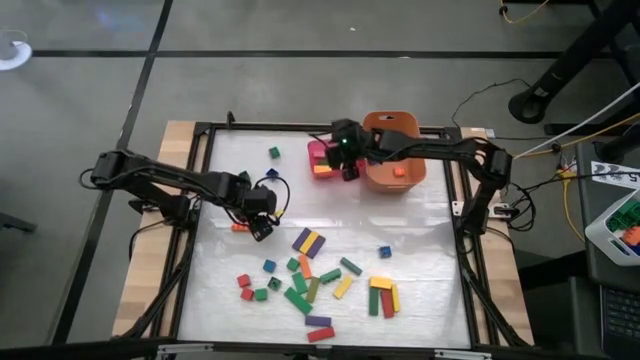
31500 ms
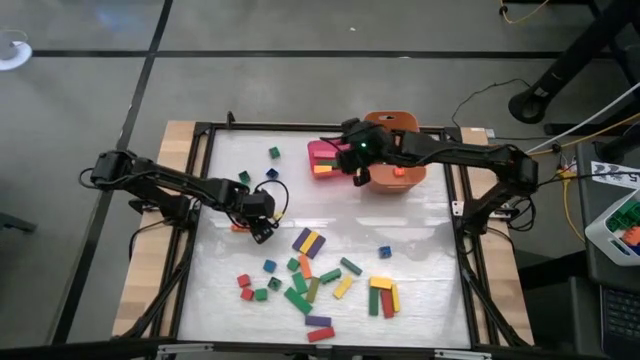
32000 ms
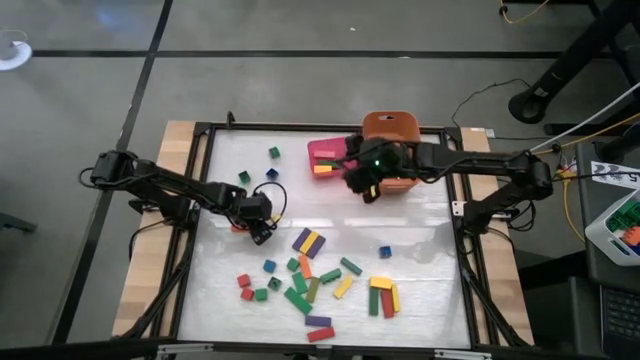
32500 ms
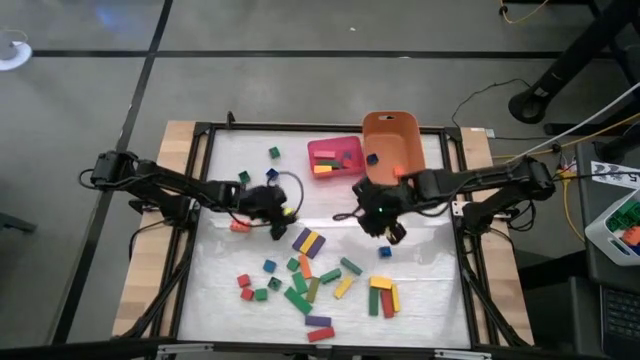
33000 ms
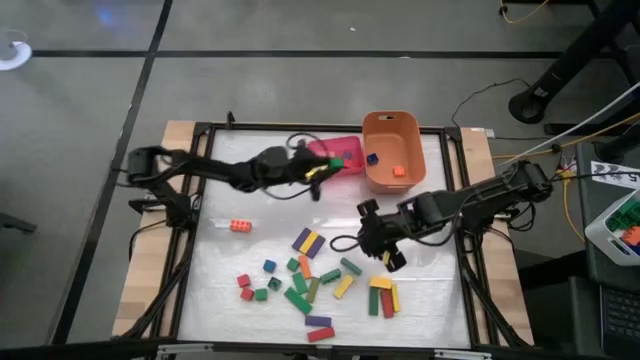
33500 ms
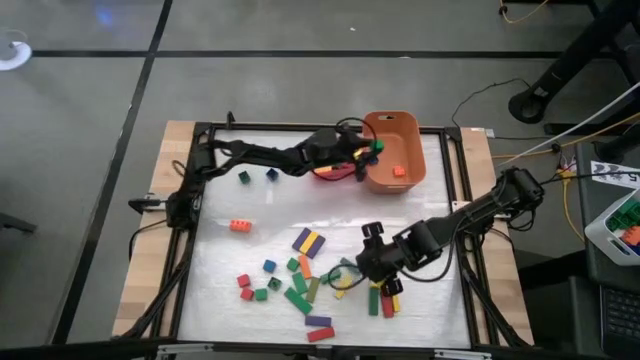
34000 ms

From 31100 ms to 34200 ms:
Task: Sort blocks by size
Put the small green block into the orange bin

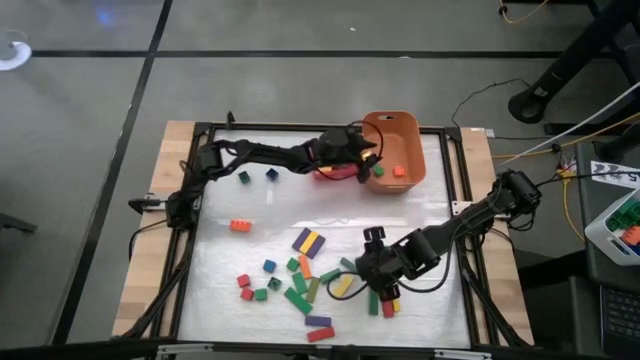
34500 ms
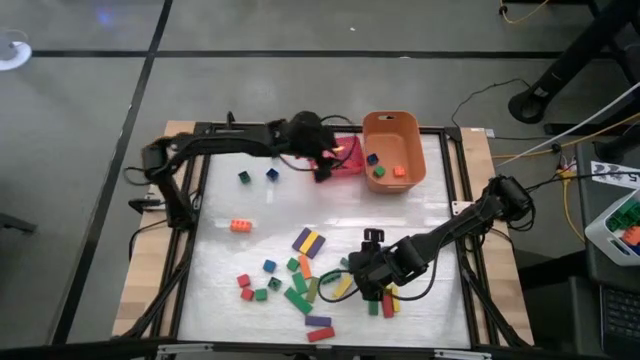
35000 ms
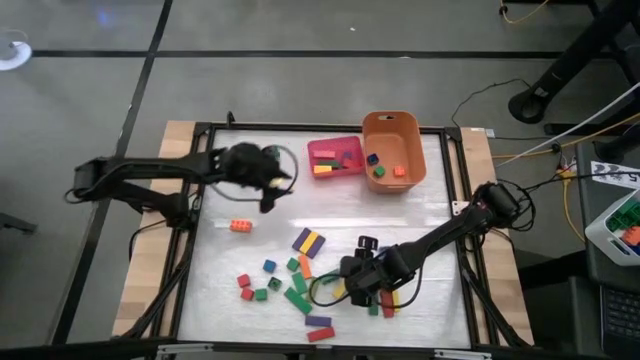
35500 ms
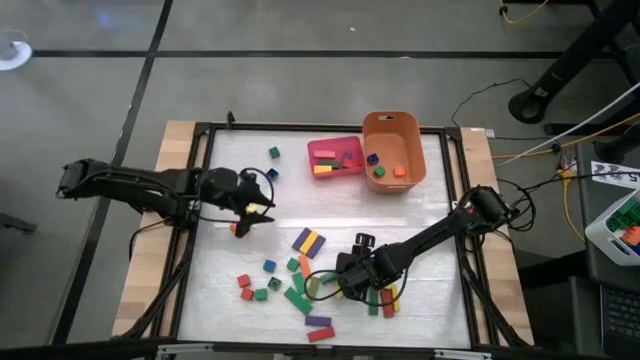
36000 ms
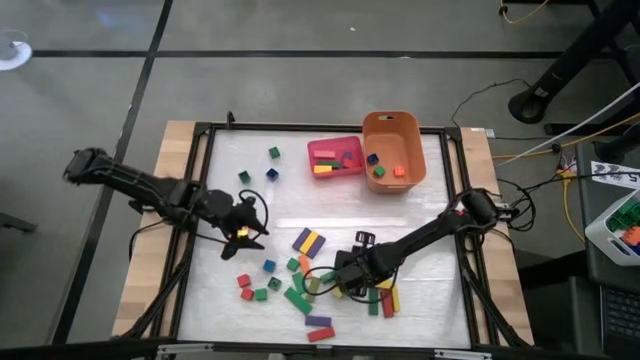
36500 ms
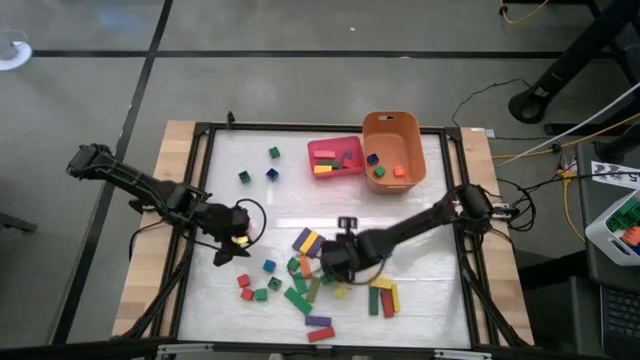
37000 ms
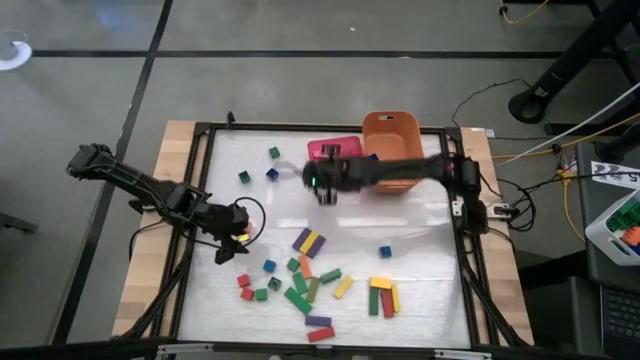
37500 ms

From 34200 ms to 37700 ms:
Put the large green block into the pink bin

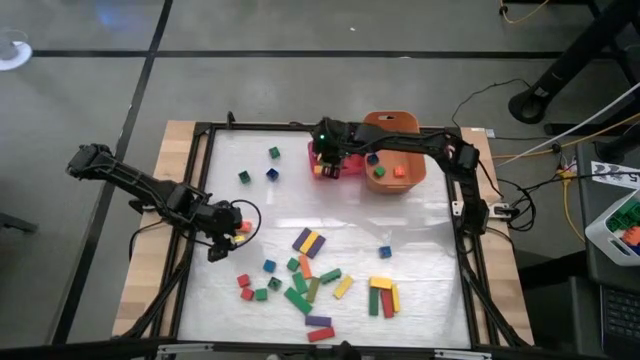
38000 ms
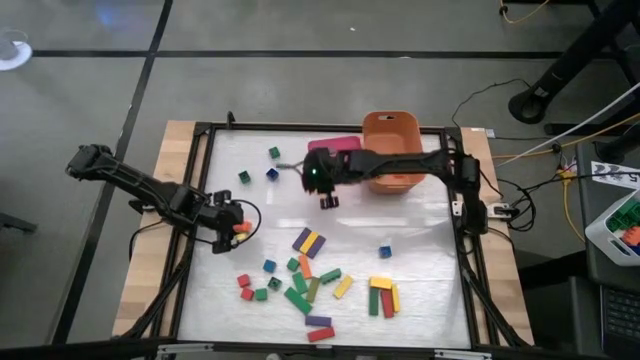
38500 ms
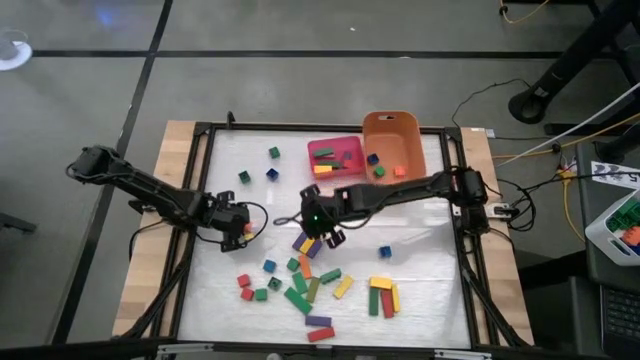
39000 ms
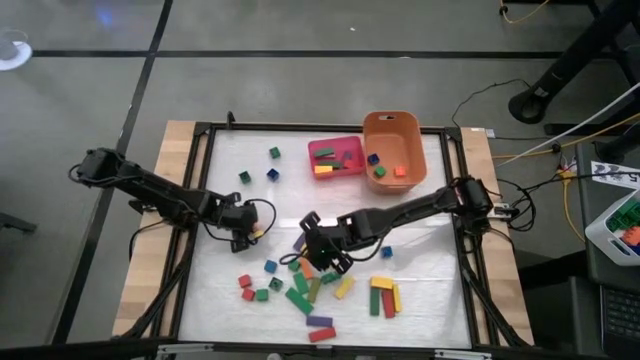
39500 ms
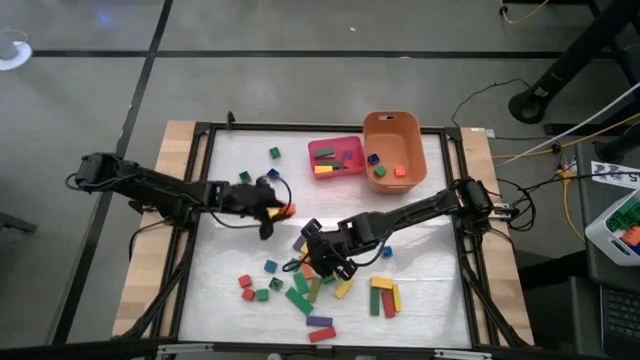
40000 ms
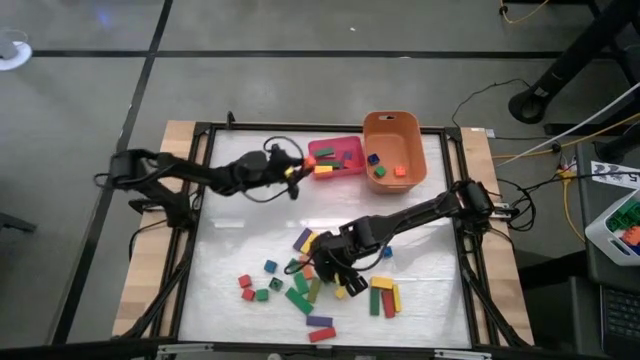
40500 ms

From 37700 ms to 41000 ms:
Put the large orange game piece into the pink bin

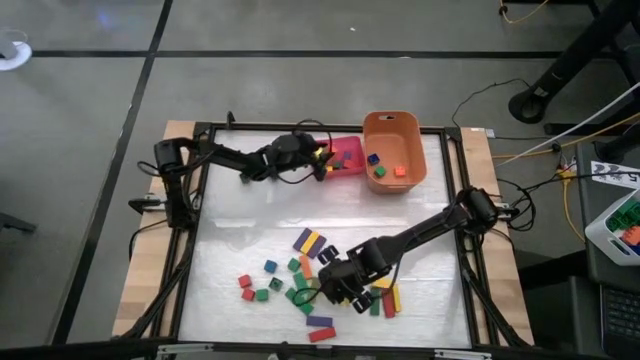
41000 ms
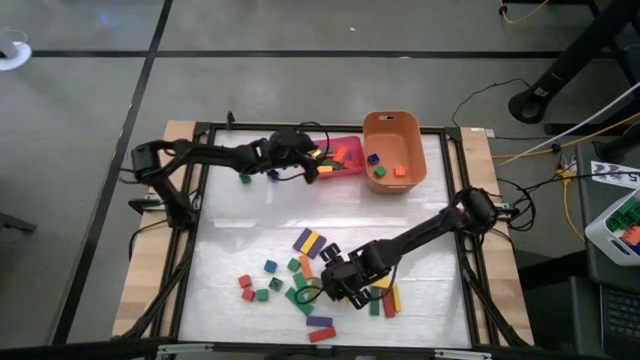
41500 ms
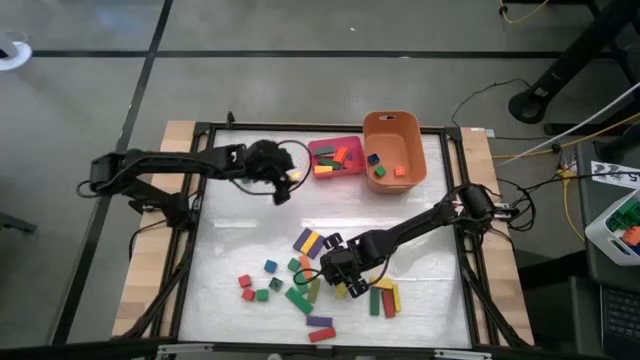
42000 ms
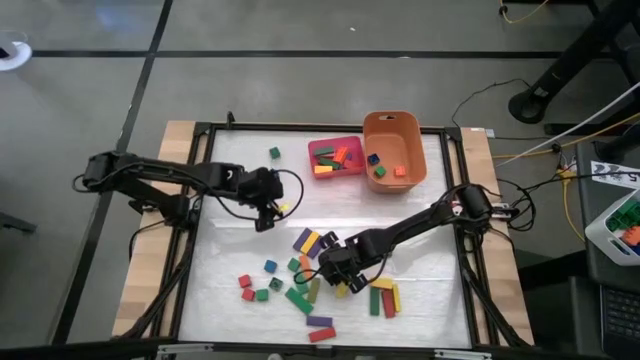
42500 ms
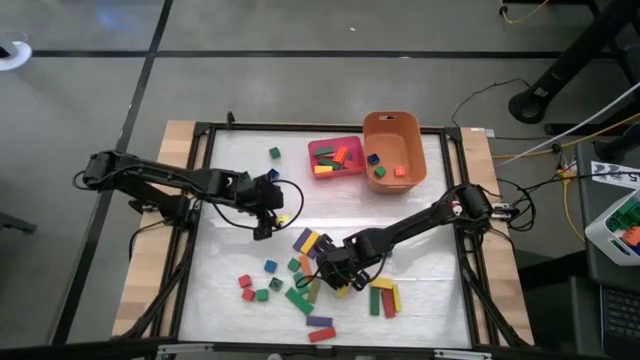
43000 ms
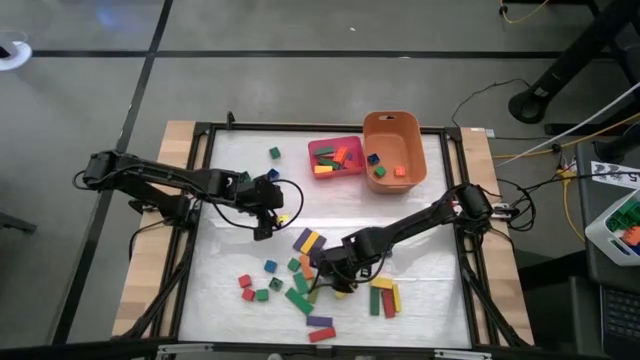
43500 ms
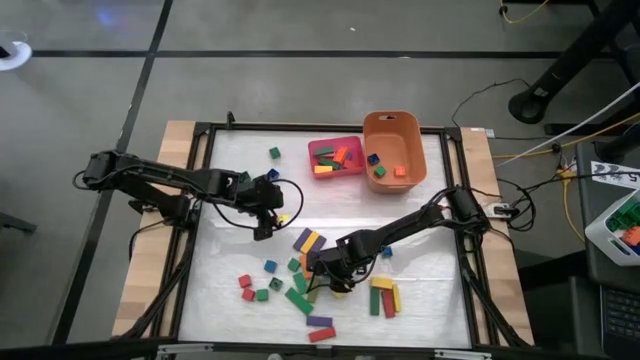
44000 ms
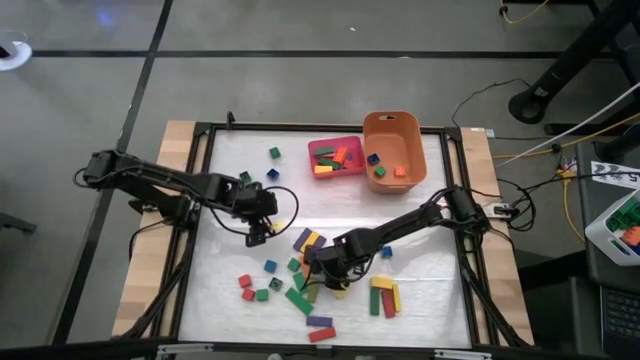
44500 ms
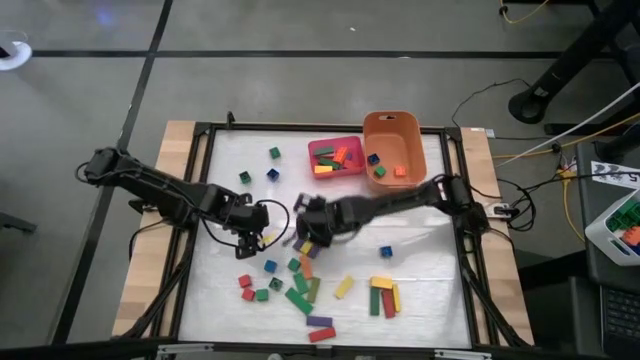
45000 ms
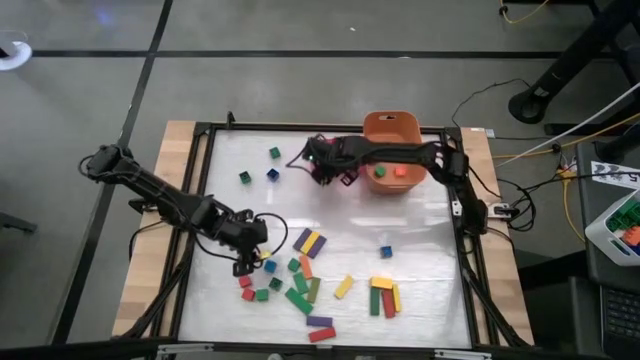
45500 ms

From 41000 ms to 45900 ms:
Put the large green game piece into the pink bin

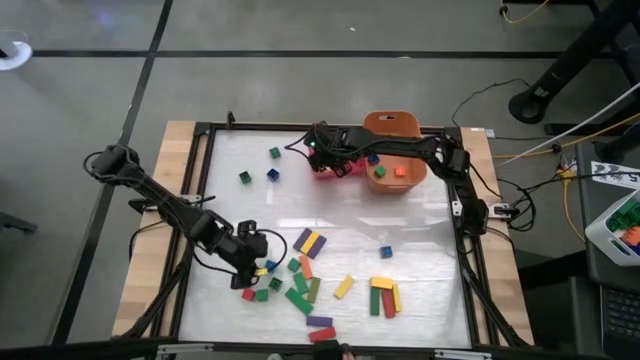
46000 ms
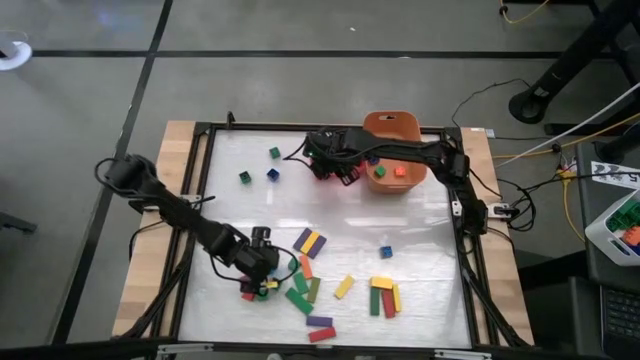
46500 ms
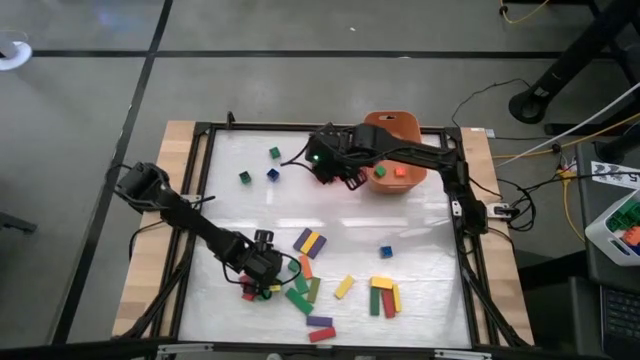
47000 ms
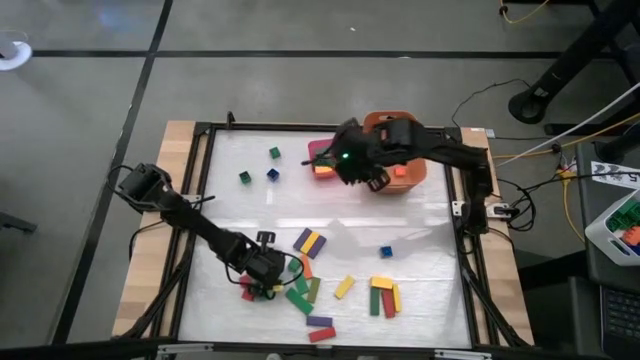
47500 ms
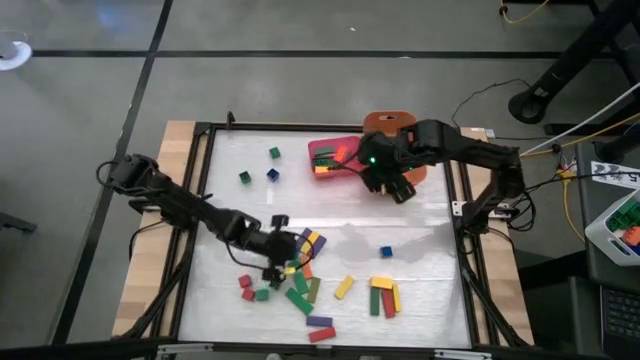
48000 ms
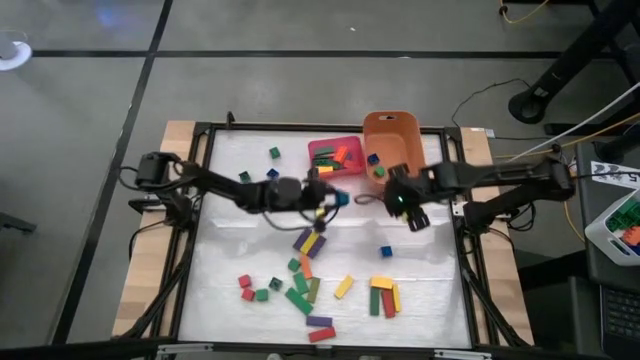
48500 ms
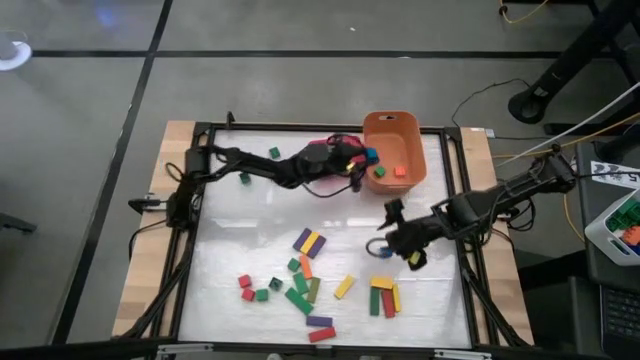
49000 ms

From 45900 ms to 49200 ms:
Put the small blue block into the orange bin

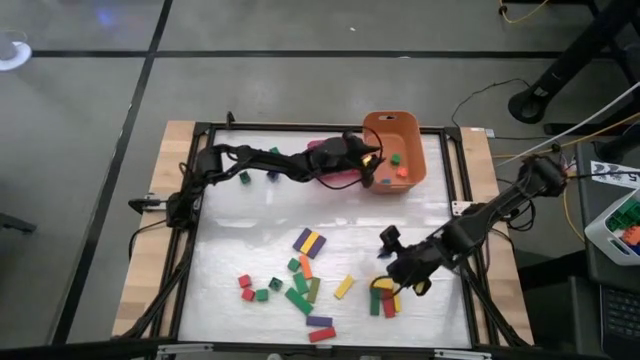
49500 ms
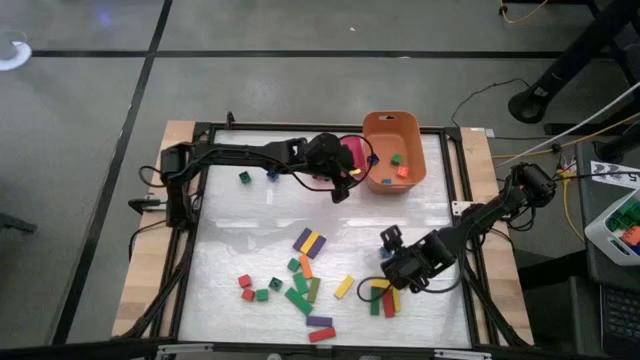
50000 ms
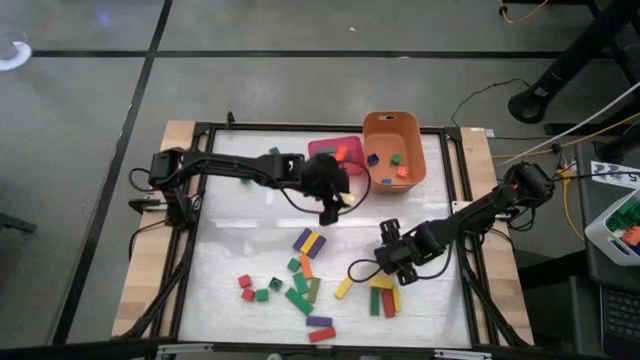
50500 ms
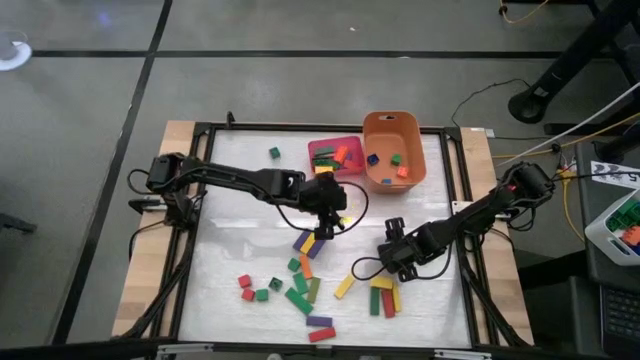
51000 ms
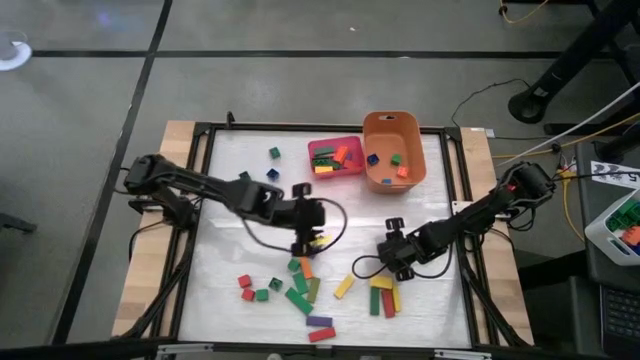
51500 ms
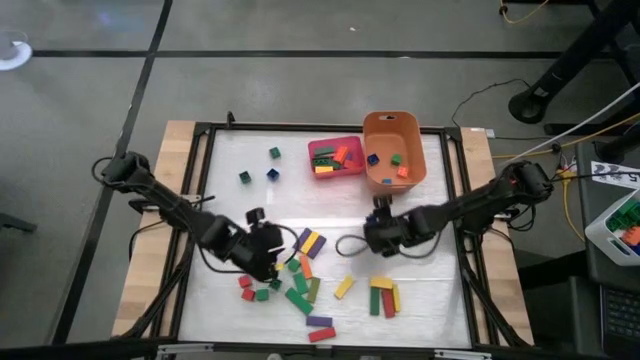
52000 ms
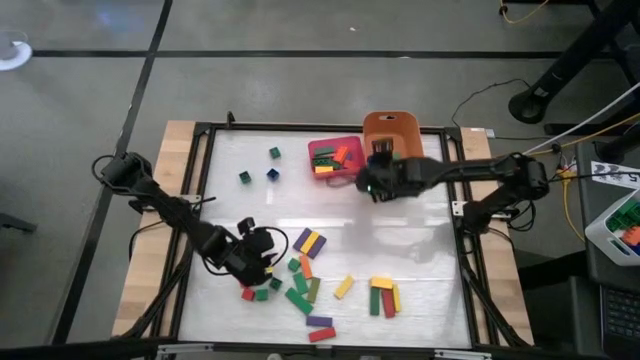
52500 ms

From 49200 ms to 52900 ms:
Put the small blue game piece into the orange bin
